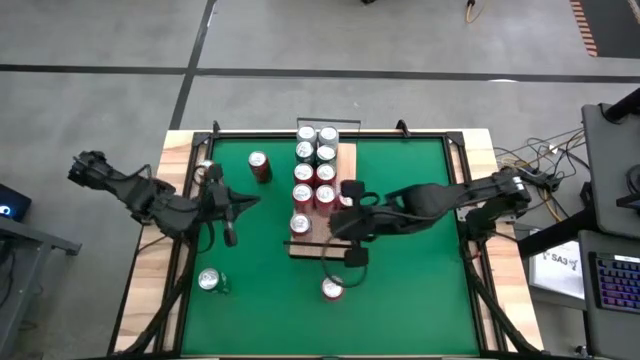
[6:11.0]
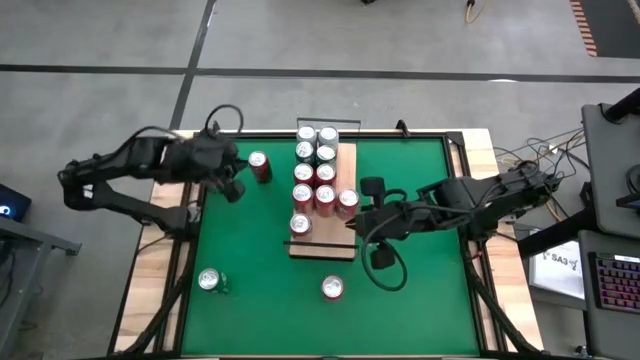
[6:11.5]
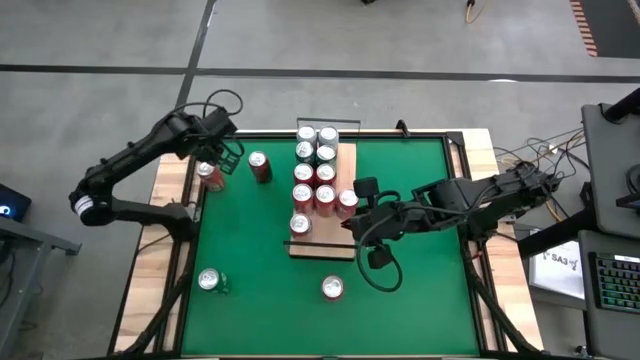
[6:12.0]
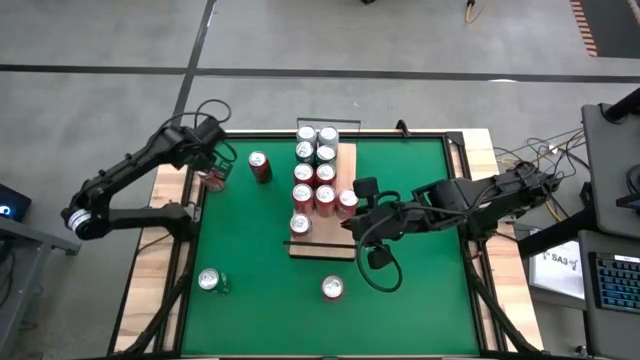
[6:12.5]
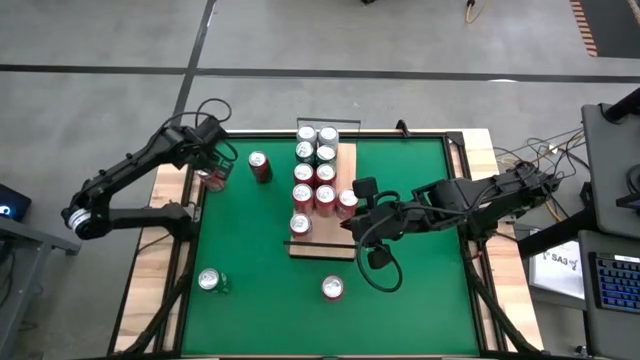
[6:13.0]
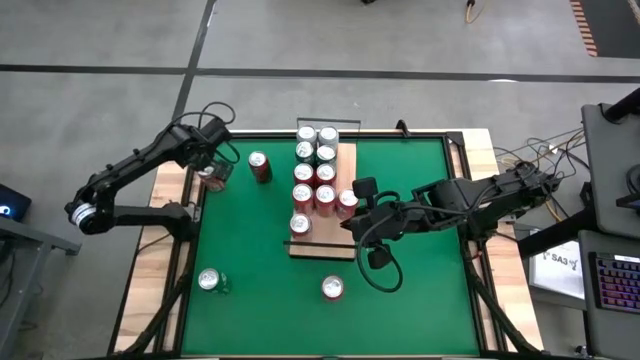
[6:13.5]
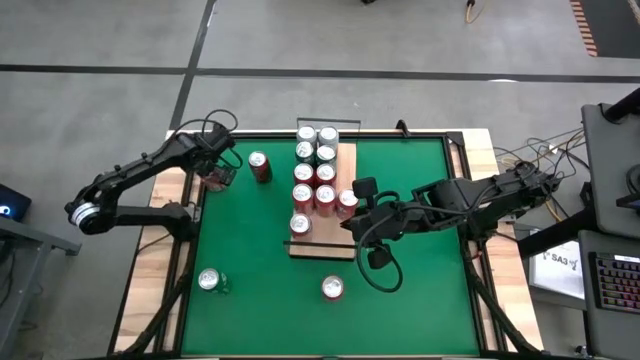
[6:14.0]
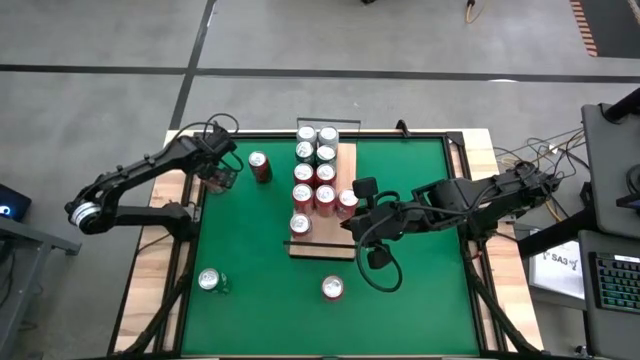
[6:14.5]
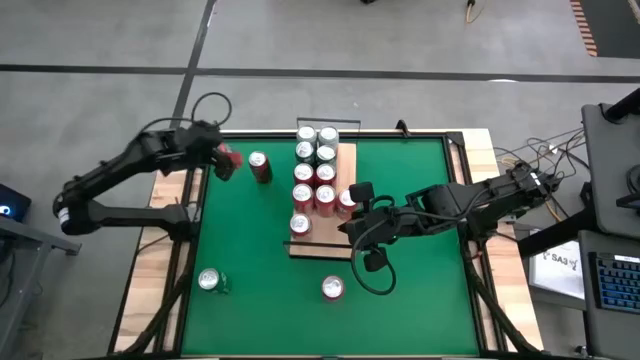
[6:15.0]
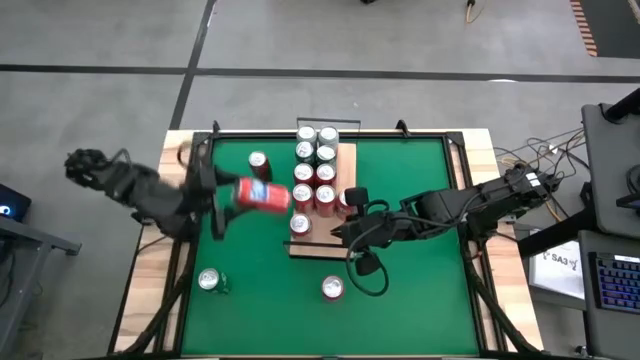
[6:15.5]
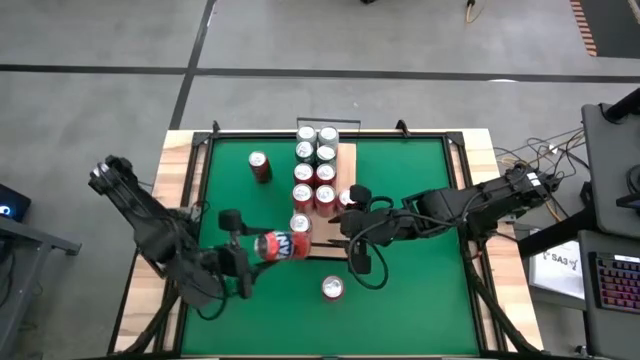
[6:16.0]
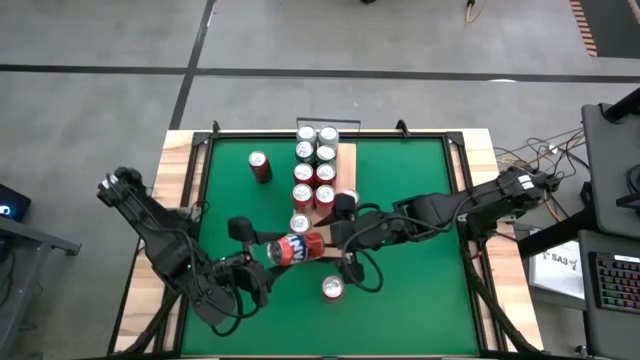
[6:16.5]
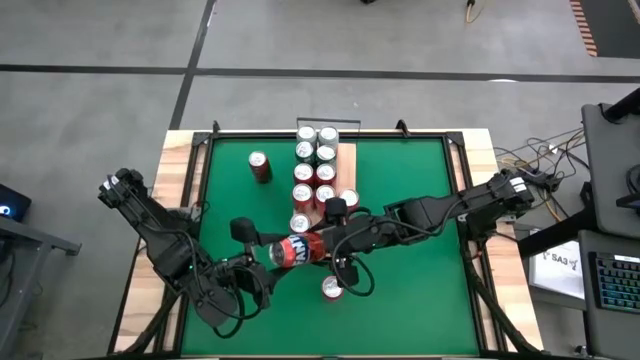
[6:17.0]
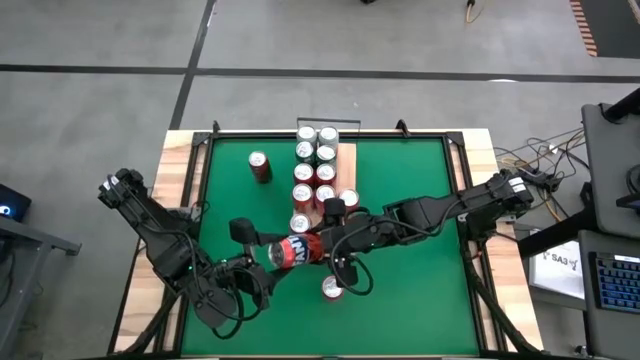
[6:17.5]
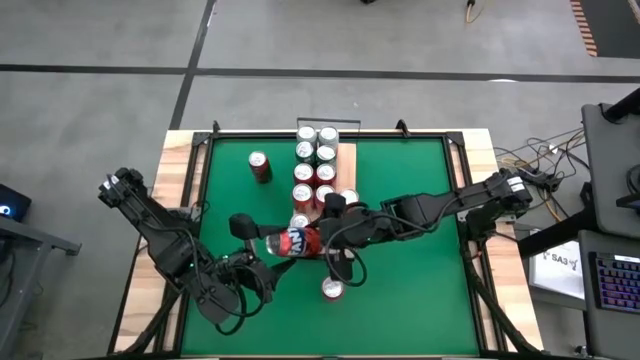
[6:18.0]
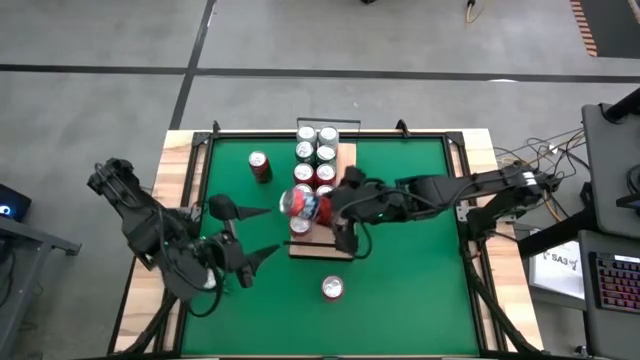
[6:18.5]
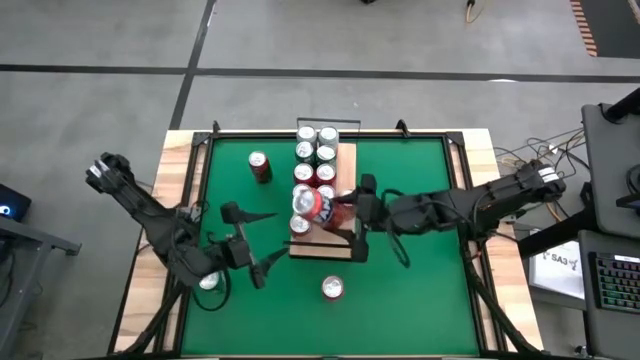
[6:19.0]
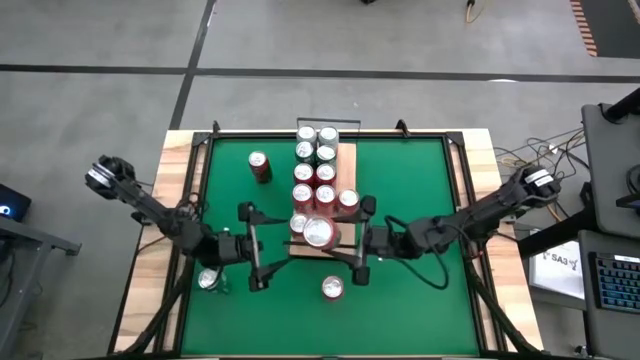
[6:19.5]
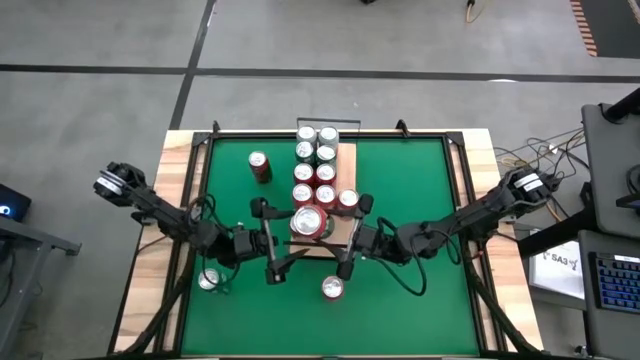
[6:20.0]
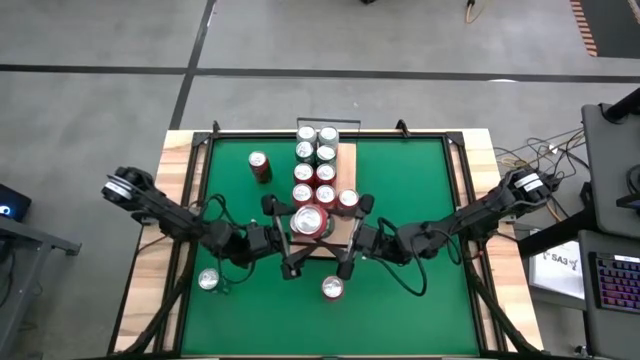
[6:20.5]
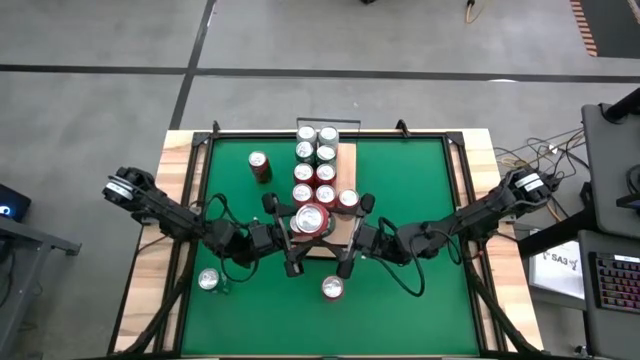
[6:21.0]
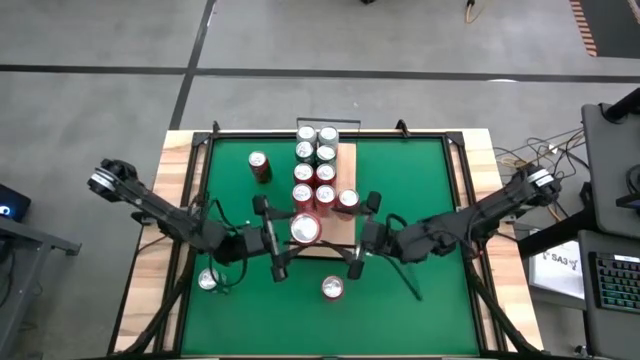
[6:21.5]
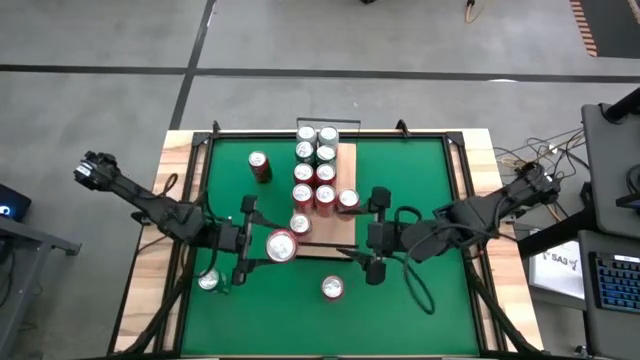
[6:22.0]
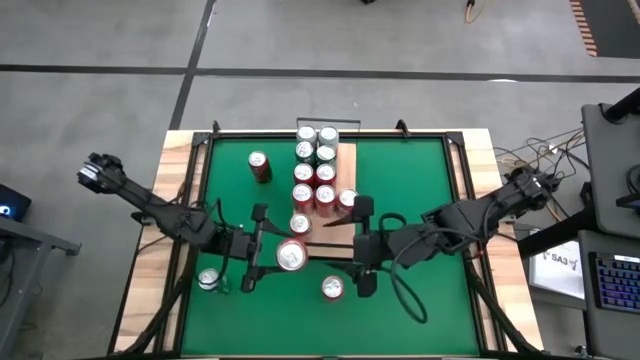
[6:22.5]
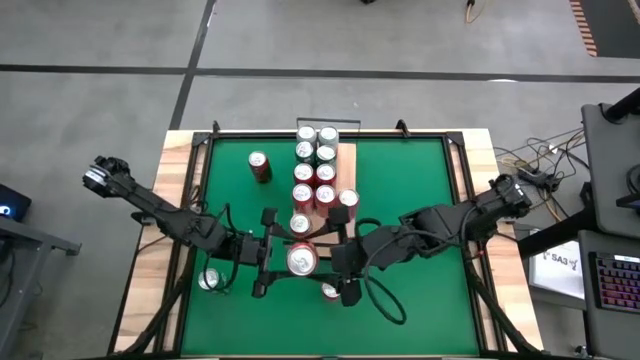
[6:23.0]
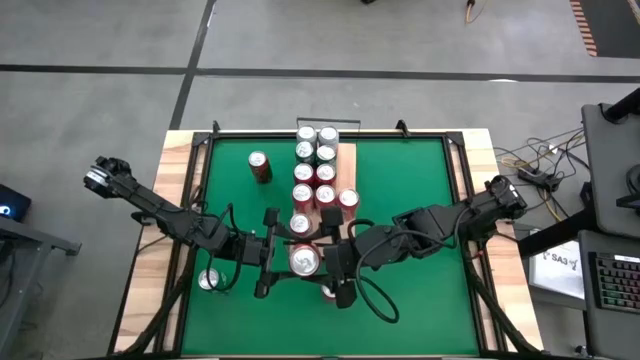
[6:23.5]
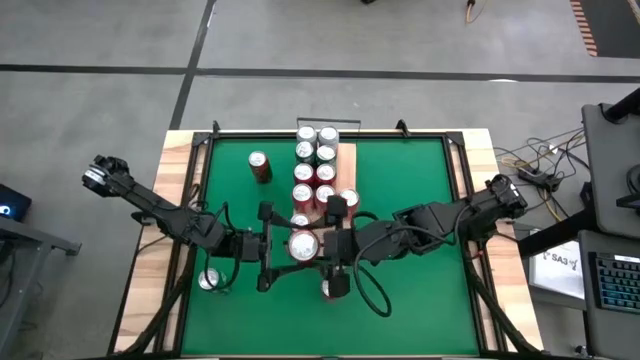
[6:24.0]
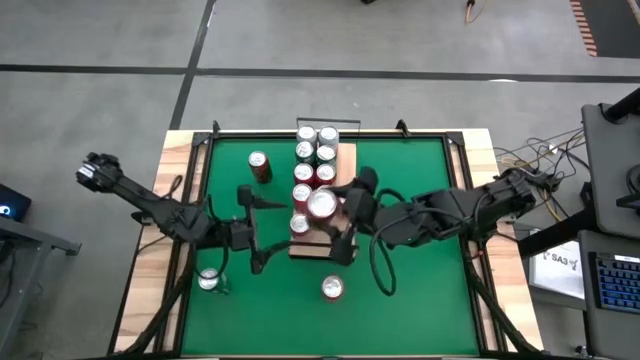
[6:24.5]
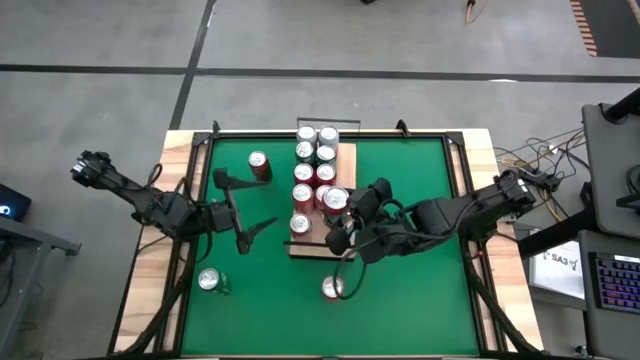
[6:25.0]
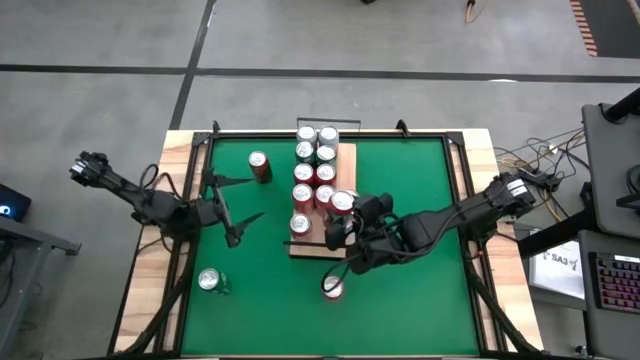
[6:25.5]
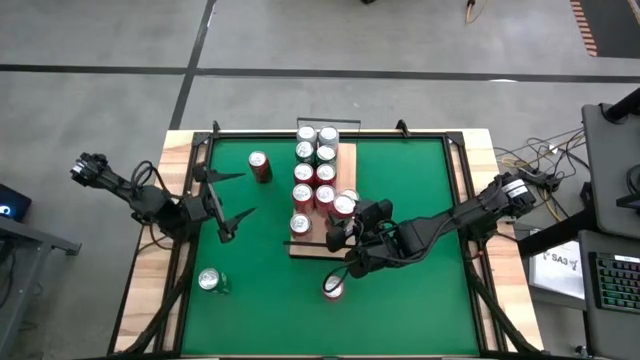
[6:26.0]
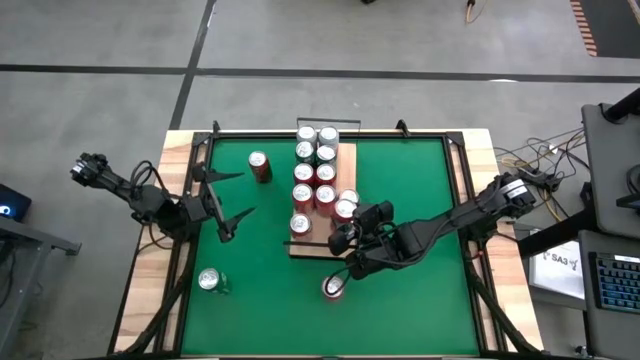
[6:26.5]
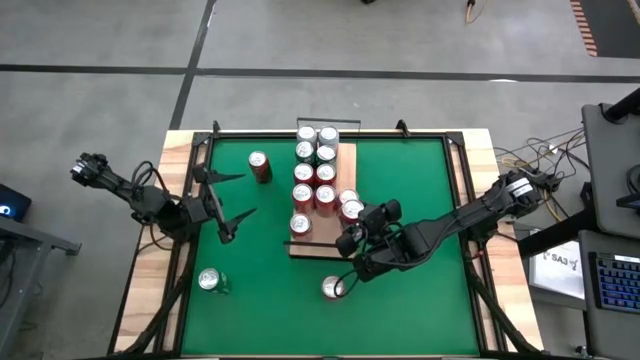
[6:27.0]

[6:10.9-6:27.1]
Task: Place canned beverage on shelf
Put the orange soda can on the shelf and aligned with the other orange soda can

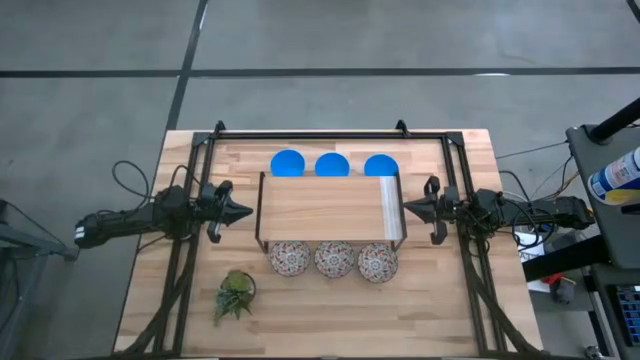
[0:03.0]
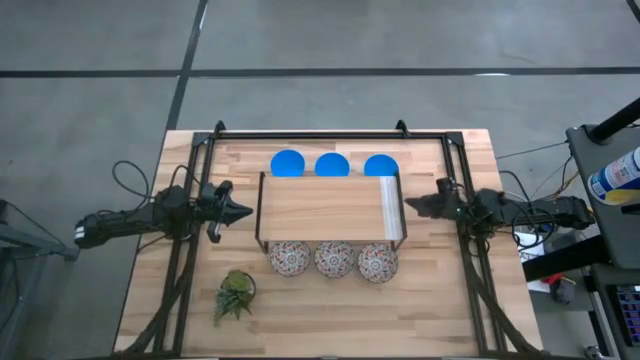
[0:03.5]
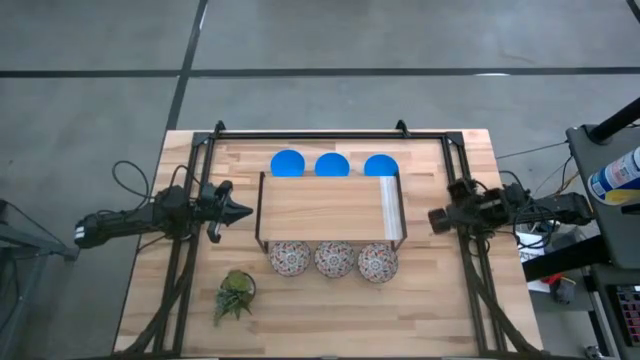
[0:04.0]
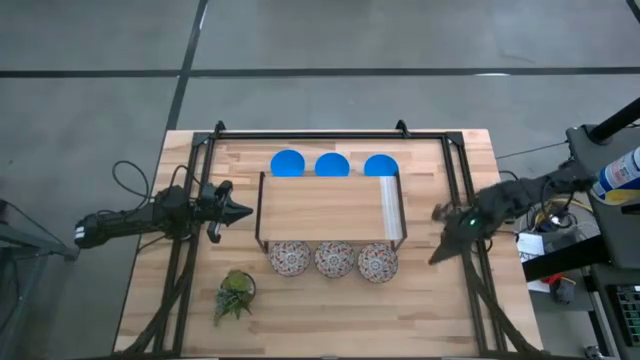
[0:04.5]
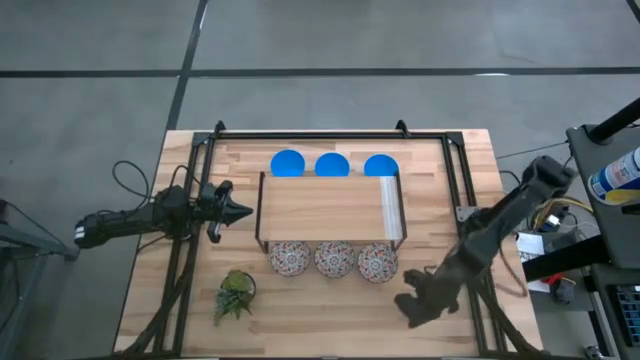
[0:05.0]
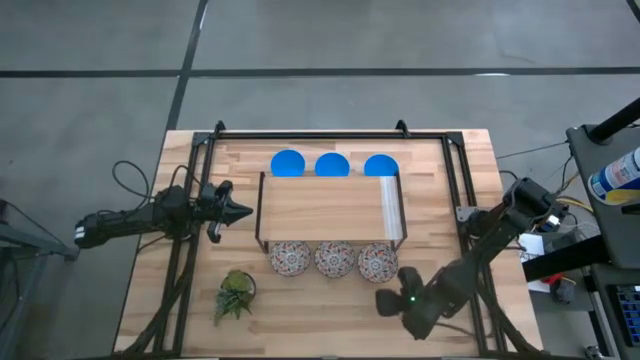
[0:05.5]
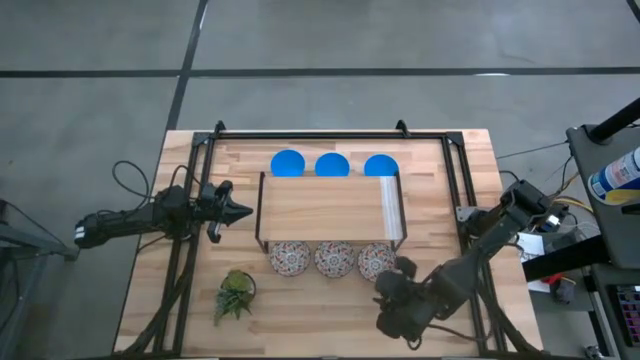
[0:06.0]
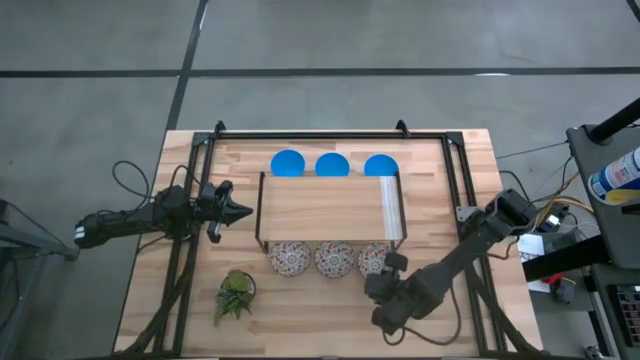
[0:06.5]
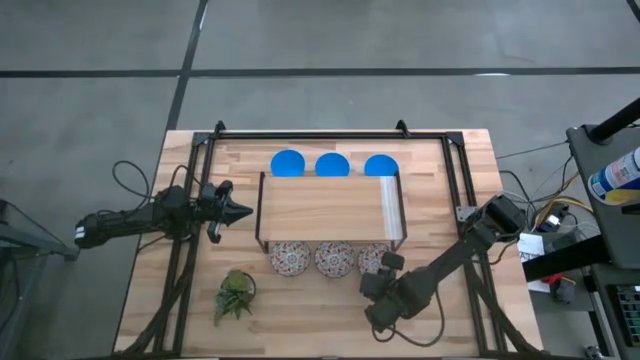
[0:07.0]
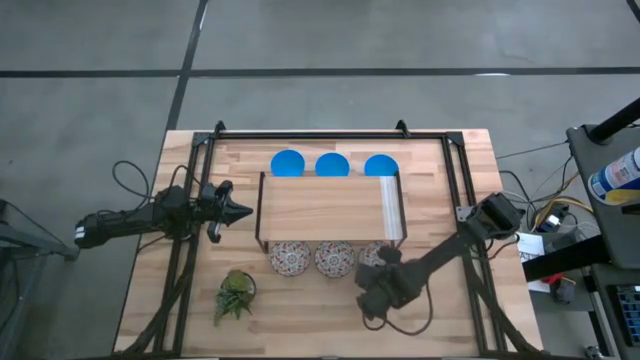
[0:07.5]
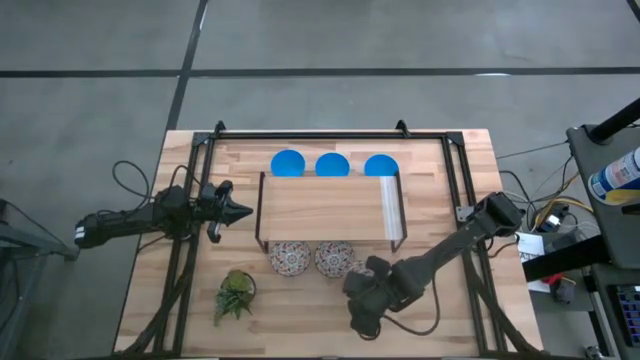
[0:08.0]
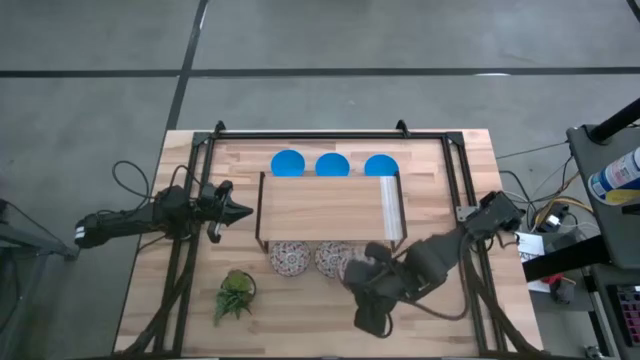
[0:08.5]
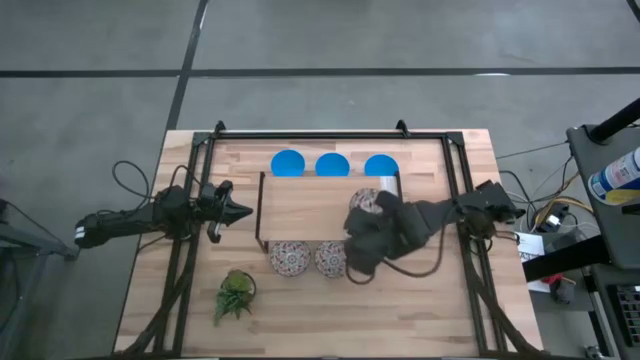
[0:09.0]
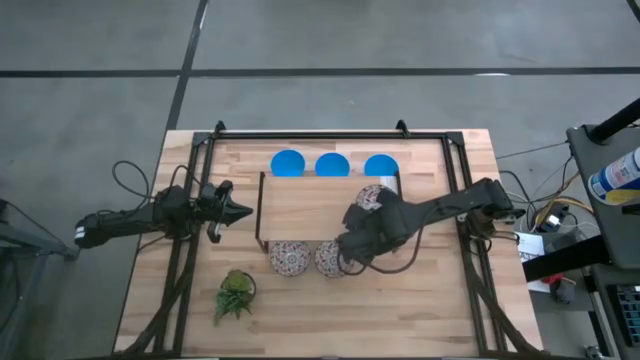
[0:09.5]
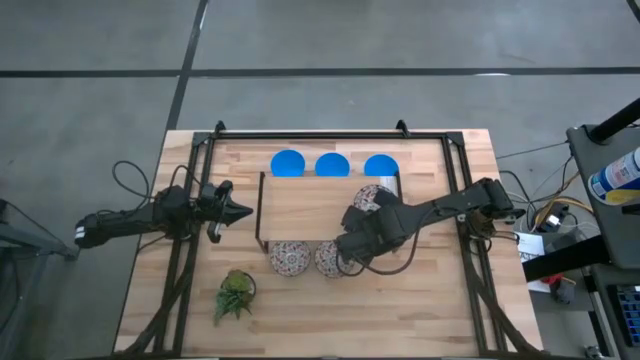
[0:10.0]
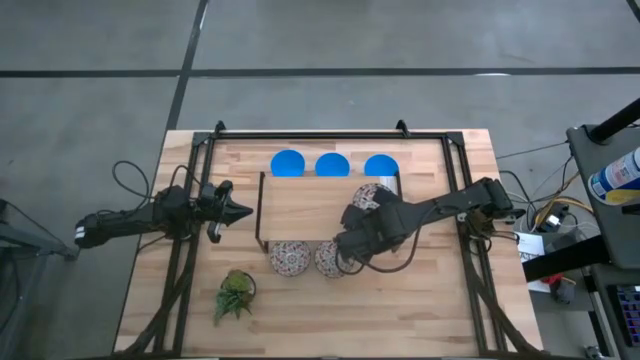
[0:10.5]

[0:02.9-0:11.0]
Task: Pick & Place Mini bowls
Put the right black patterned bowl on the shelf
